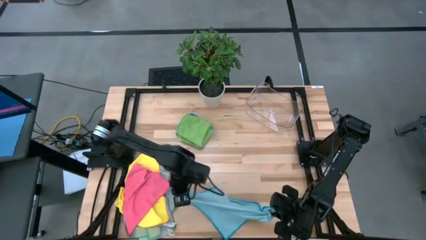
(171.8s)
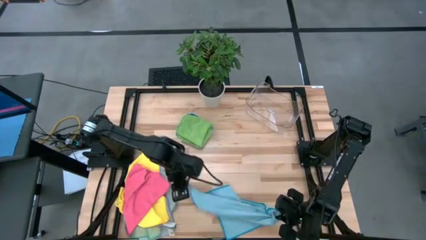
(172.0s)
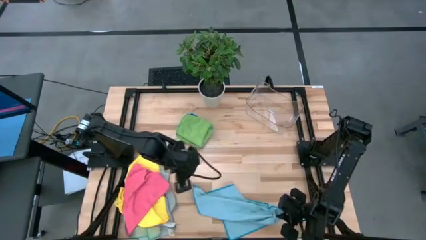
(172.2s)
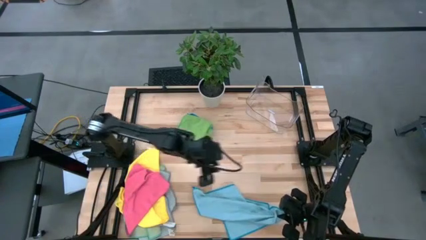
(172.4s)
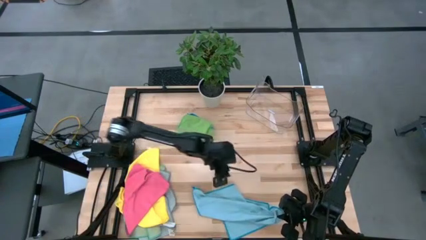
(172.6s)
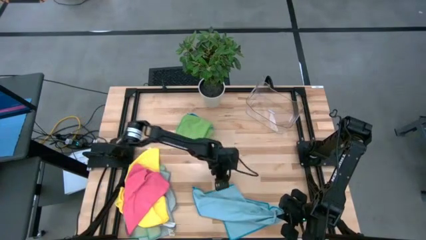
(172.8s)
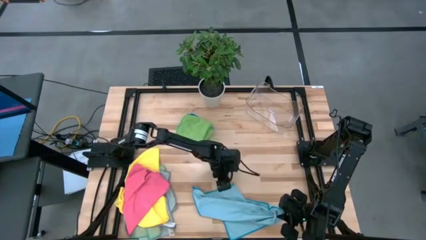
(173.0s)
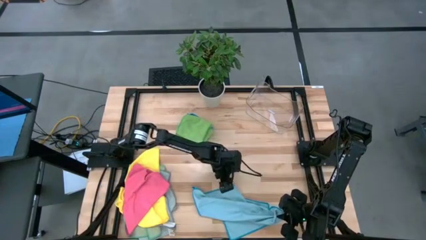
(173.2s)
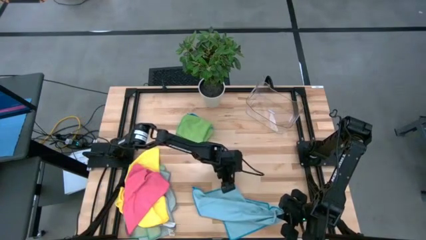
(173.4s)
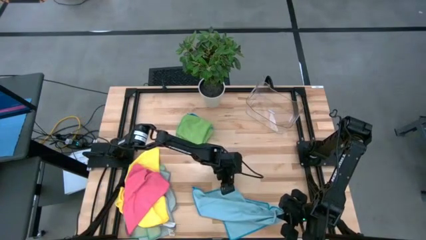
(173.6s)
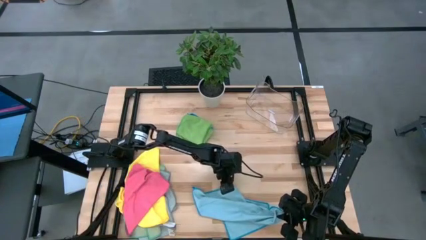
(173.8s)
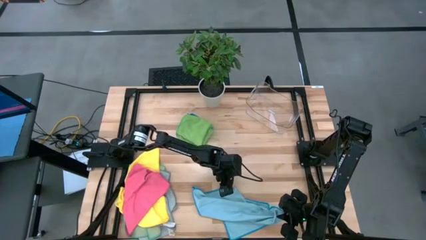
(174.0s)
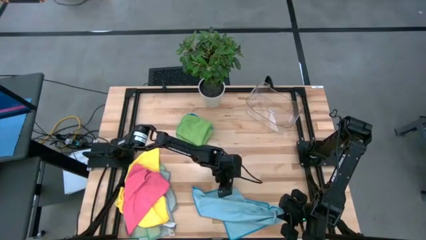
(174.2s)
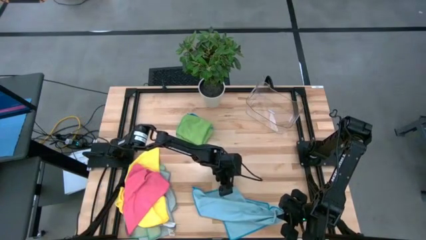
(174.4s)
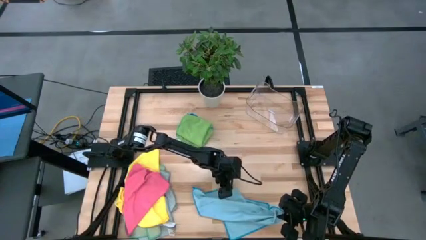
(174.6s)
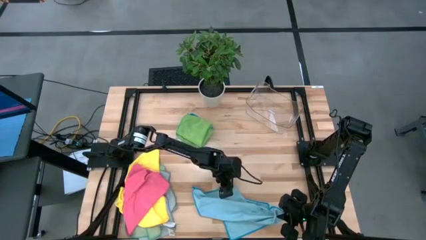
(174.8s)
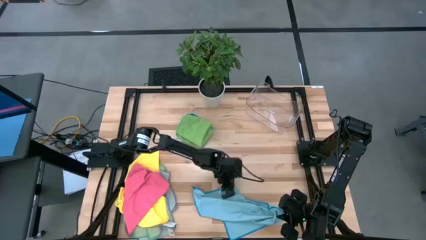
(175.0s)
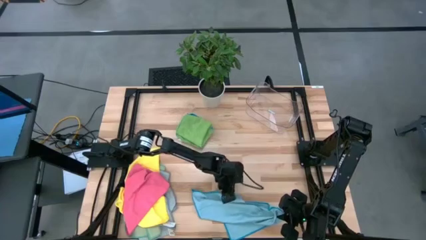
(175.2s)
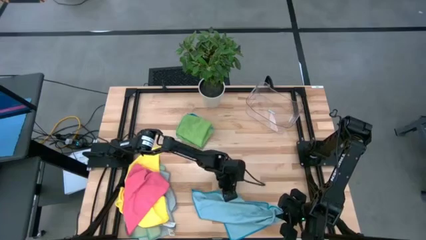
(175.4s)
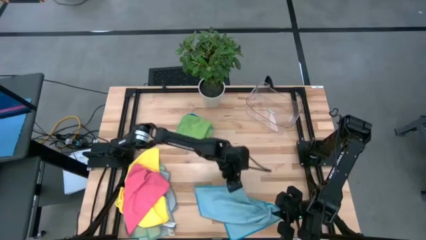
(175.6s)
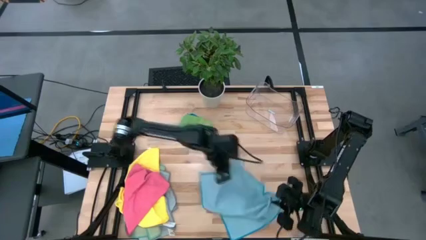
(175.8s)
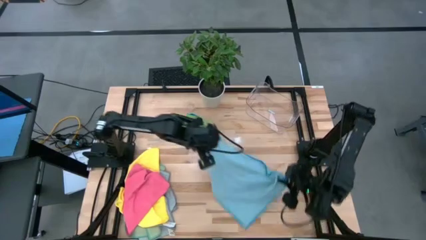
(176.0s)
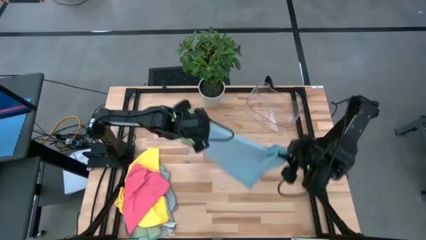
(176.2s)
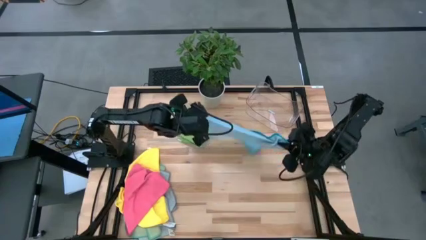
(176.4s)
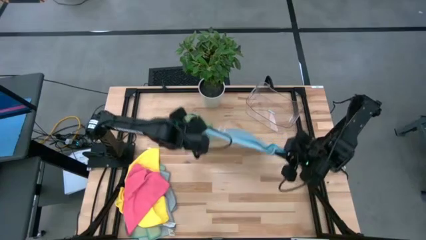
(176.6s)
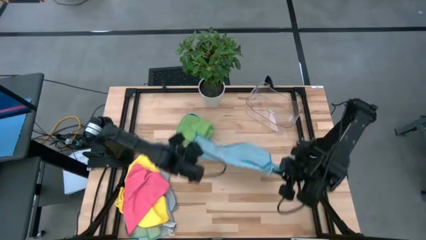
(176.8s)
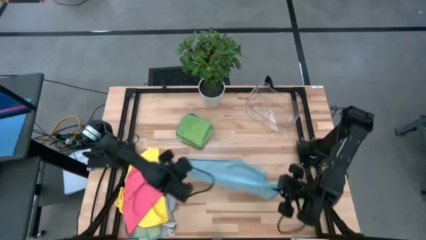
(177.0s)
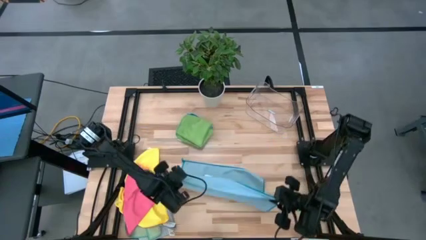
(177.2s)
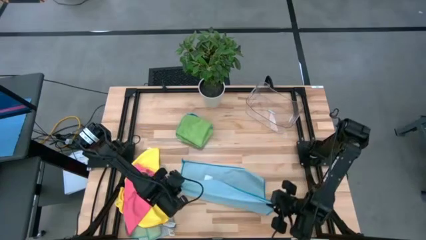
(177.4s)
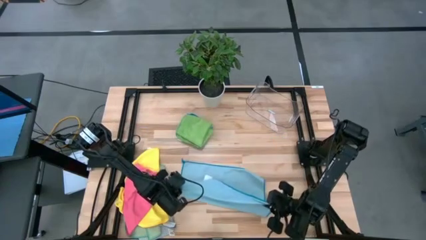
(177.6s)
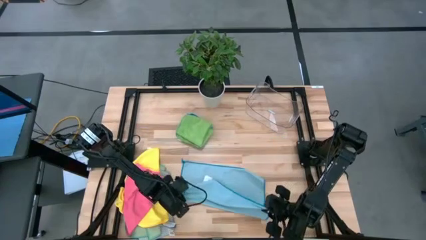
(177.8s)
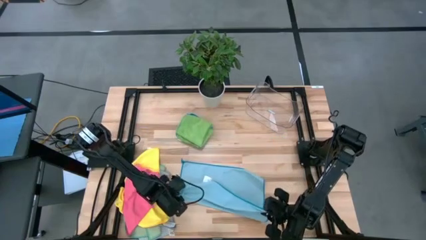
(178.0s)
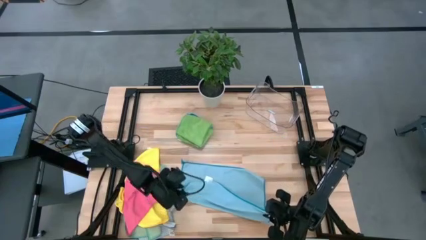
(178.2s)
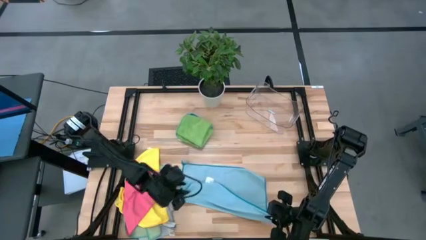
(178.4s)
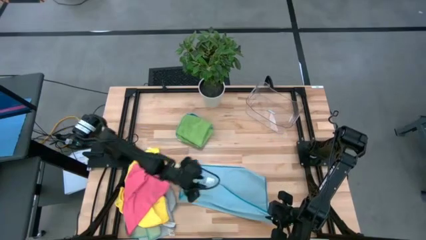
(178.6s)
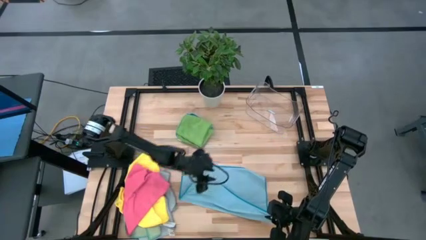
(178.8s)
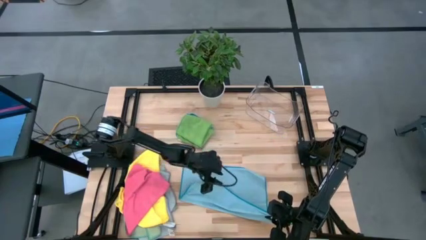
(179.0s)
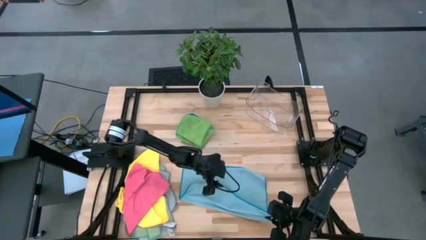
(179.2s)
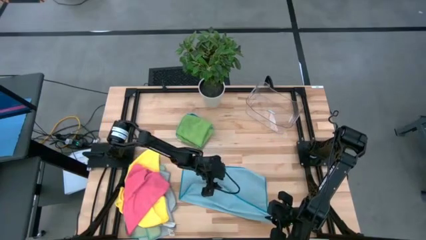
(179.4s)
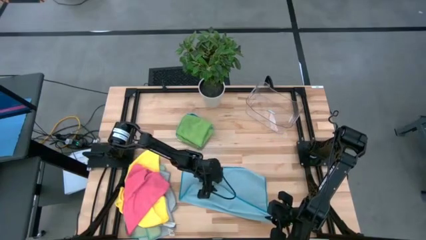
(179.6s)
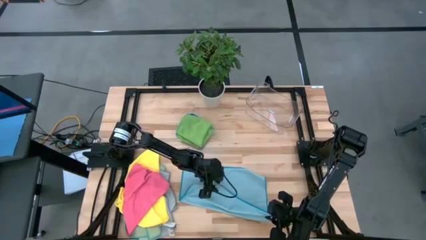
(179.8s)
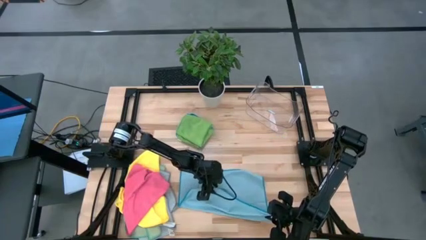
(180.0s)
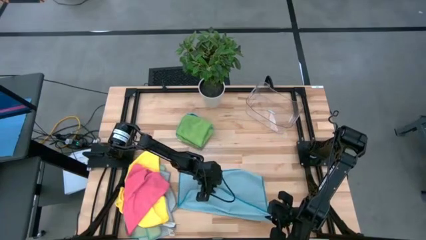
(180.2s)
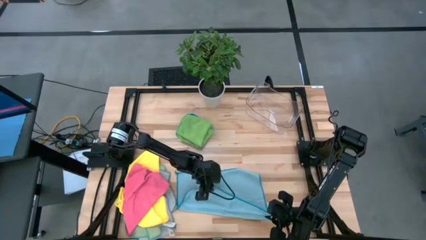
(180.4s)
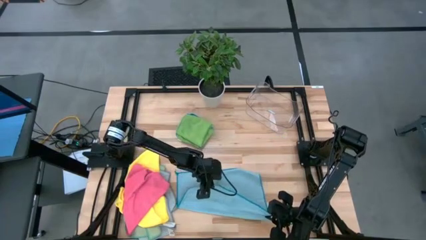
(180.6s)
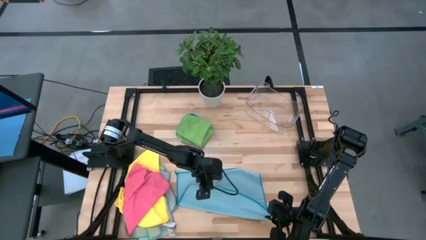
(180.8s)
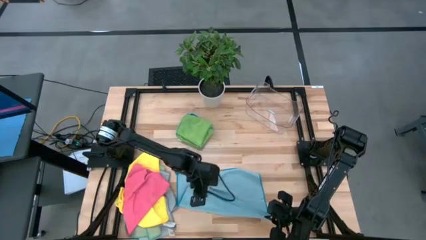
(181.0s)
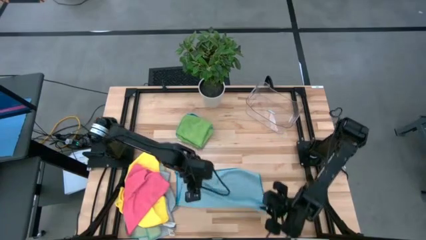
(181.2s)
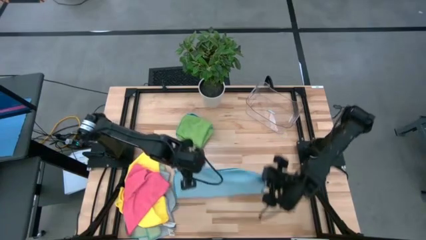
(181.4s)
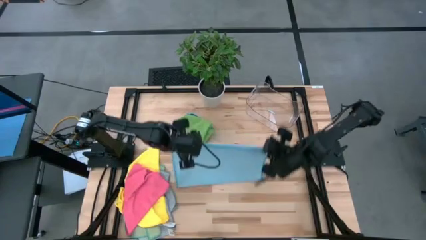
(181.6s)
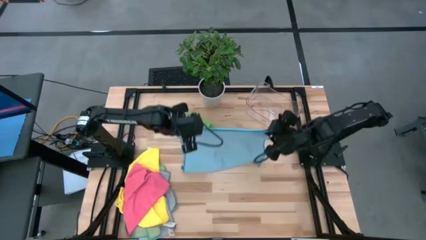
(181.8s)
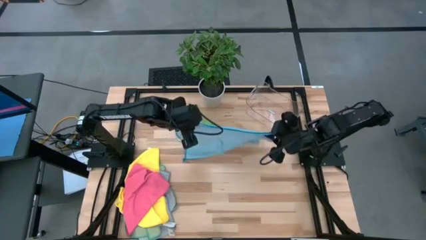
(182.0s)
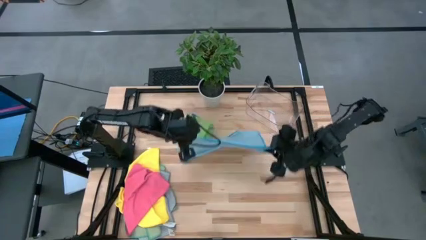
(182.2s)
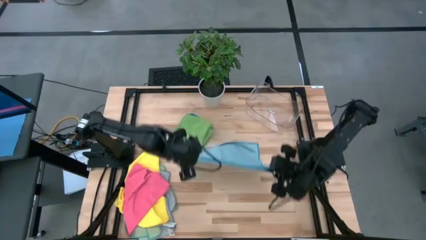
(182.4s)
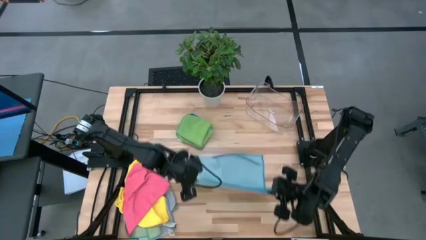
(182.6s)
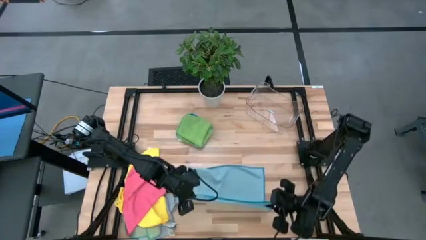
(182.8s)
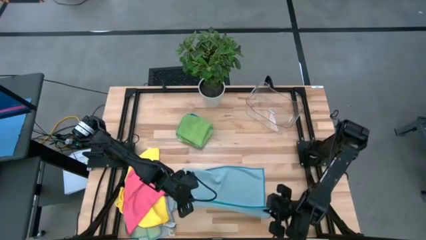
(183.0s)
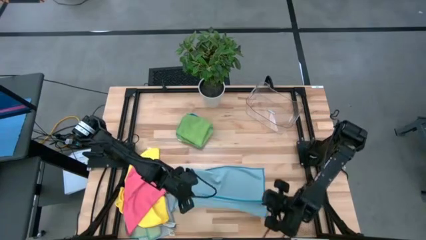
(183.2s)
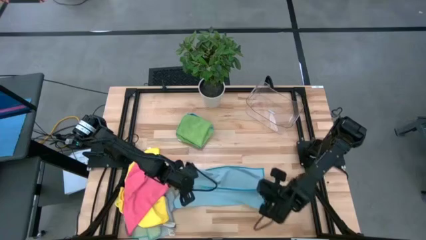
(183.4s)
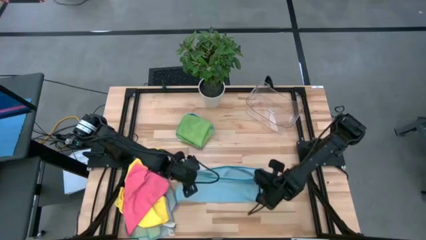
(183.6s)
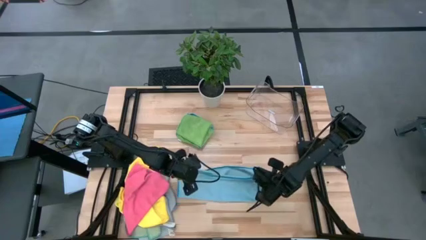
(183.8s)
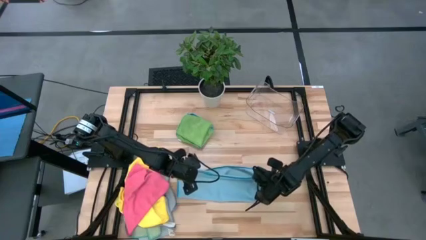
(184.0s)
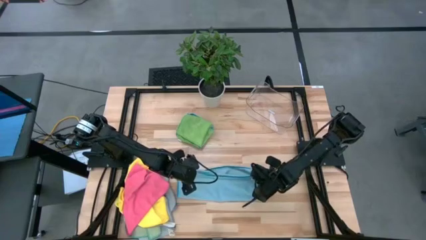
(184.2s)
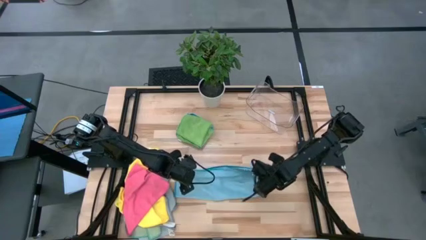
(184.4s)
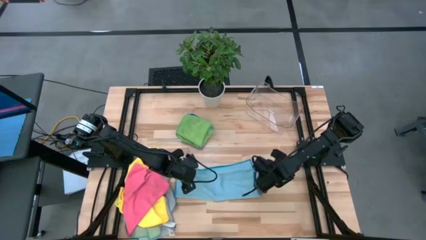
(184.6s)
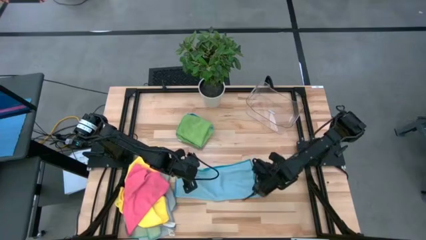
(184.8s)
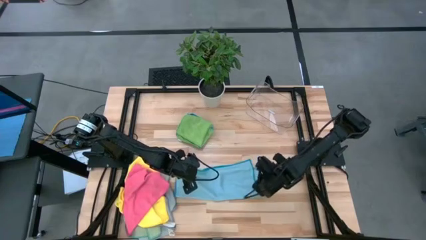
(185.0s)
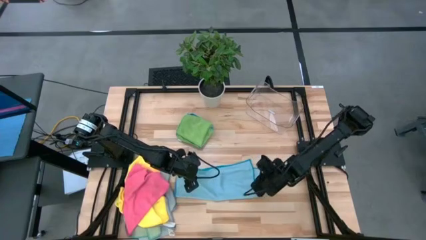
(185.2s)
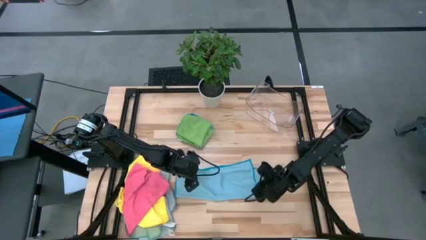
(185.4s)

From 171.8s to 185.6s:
Task: Fold microfiber towels
Fold the light blue microfiber towel

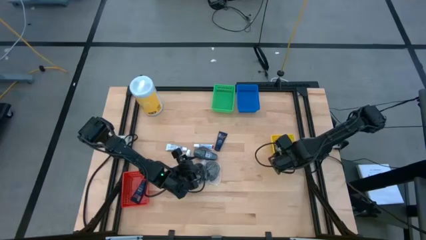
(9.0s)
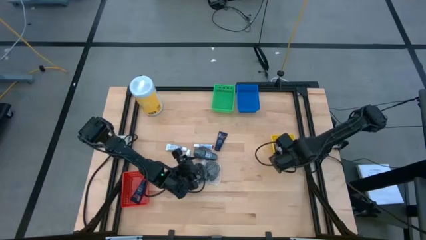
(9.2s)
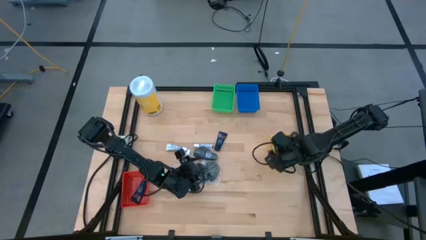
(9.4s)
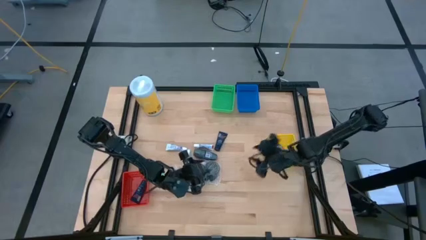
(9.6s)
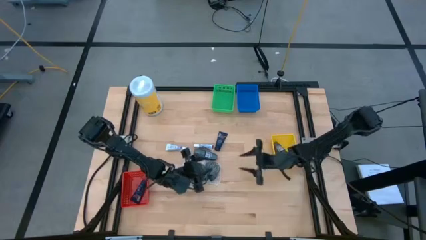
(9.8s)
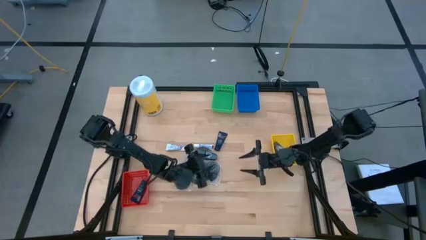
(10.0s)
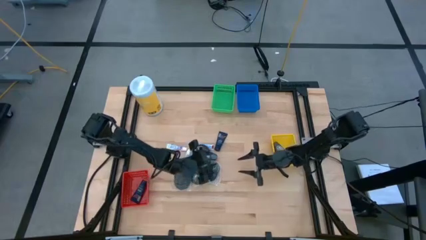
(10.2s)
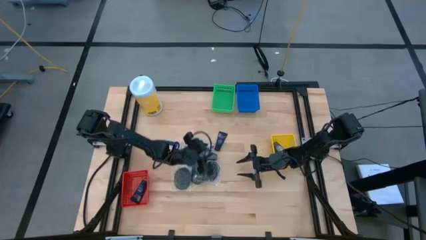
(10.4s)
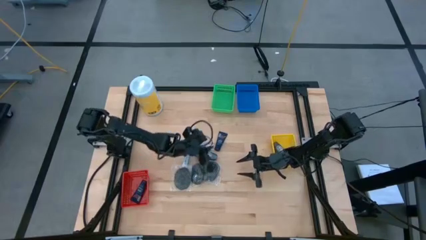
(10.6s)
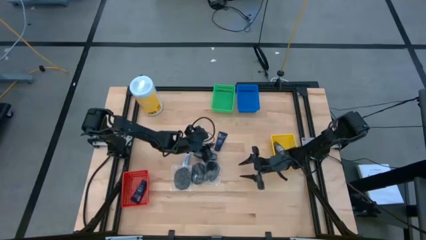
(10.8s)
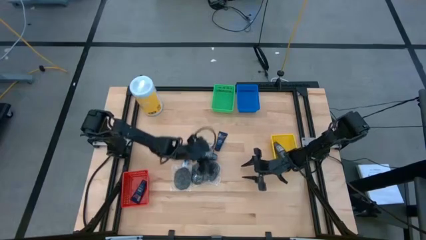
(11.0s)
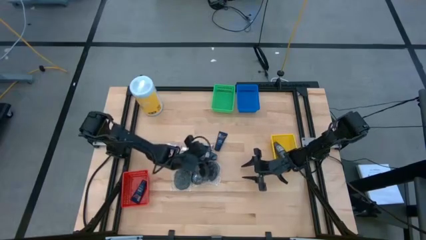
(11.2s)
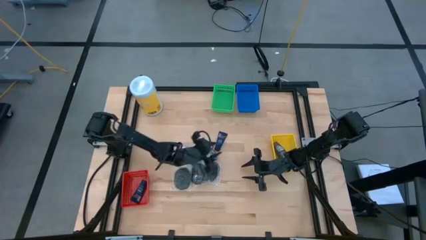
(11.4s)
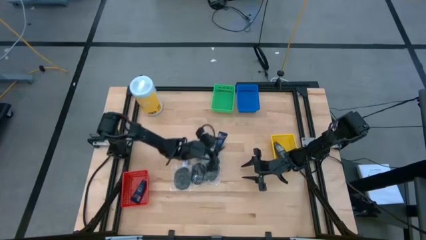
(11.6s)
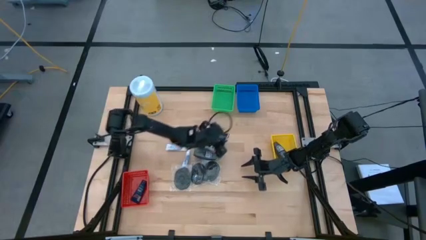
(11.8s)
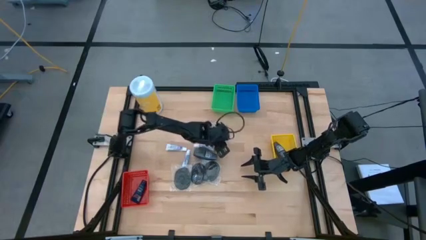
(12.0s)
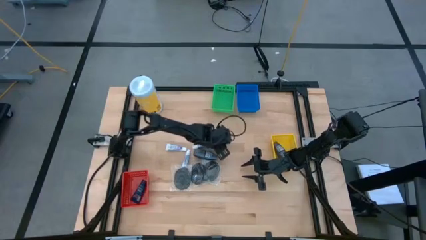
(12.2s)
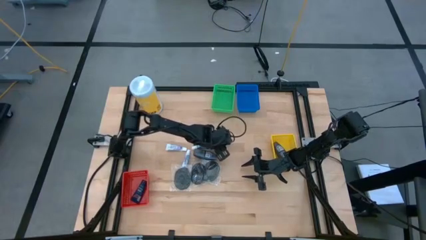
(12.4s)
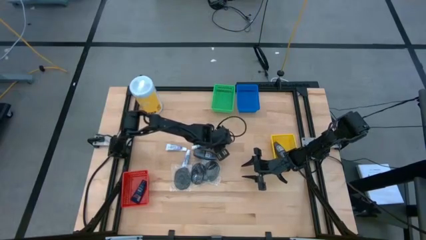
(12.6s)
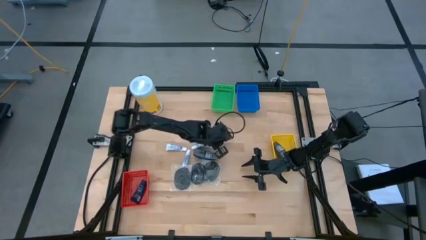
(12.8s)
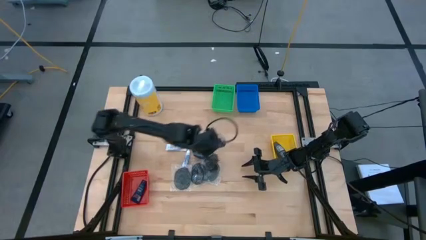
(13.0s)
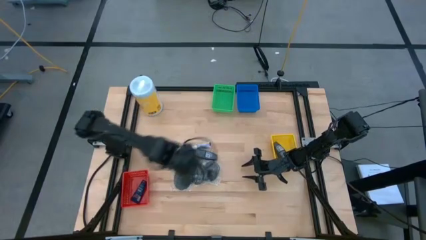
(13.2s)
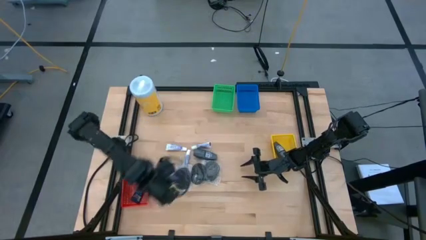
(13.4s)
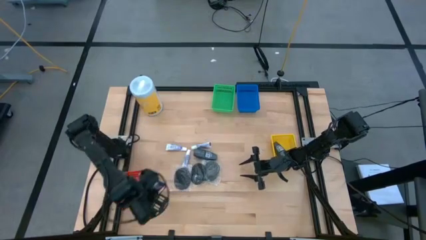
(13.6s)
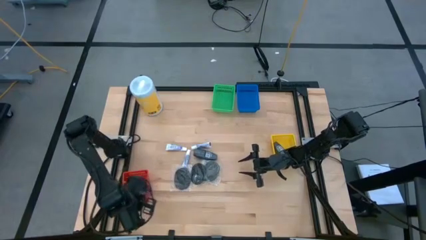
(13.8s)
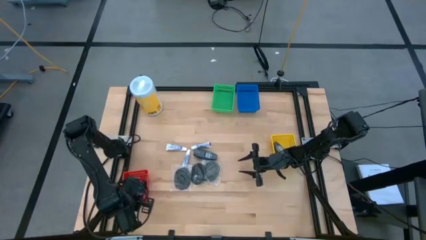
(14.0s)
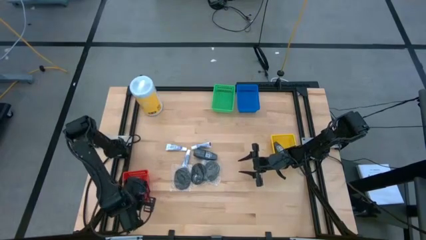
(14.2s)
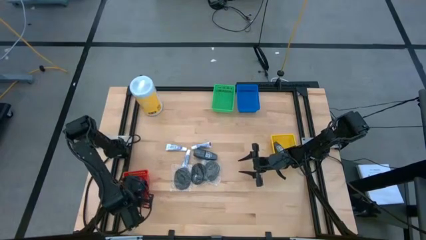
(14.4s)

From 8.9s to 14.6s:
Task: Pick & Place Travel size toiletries
Put the blue shave cream into the red basket
